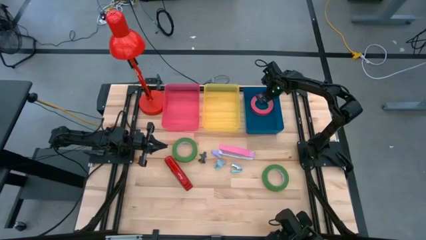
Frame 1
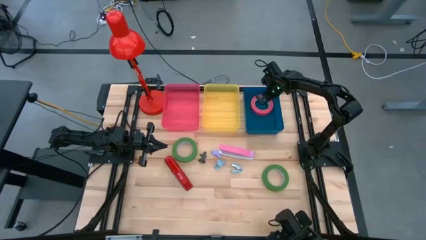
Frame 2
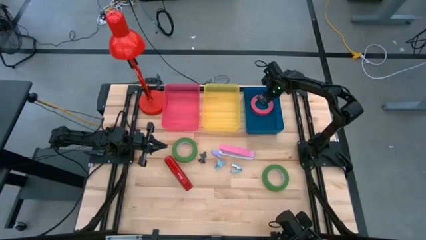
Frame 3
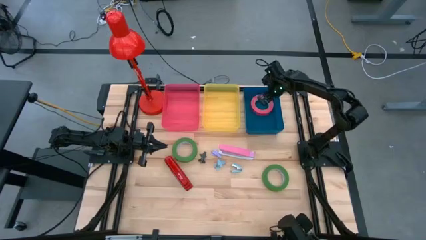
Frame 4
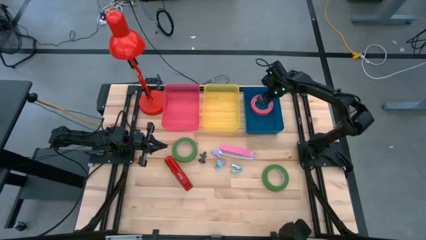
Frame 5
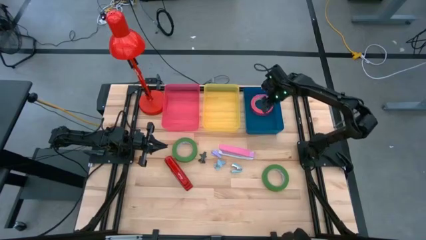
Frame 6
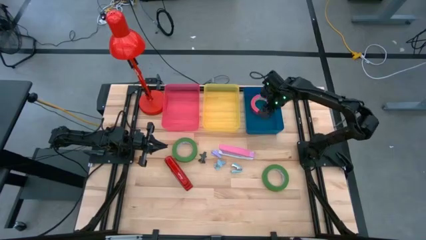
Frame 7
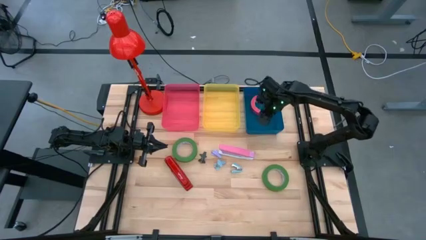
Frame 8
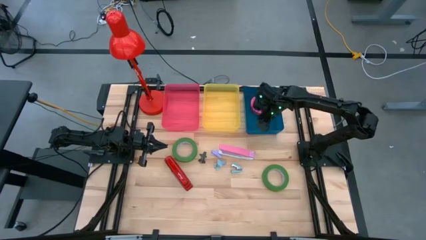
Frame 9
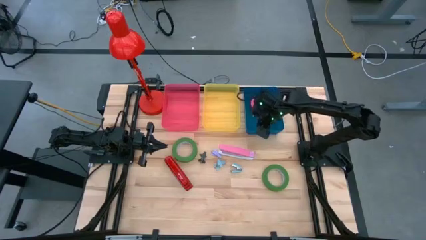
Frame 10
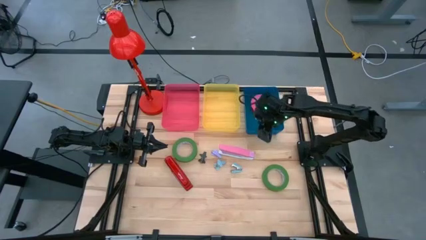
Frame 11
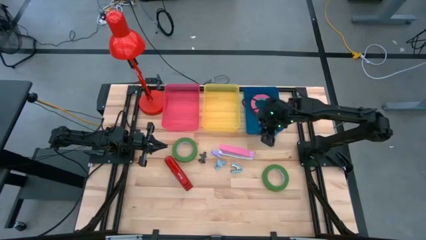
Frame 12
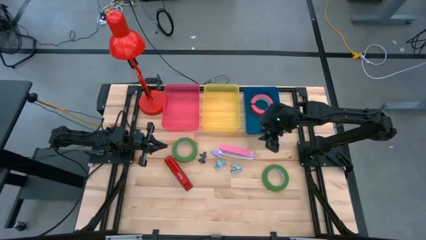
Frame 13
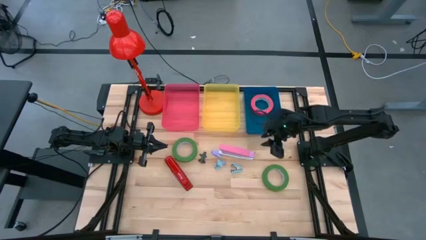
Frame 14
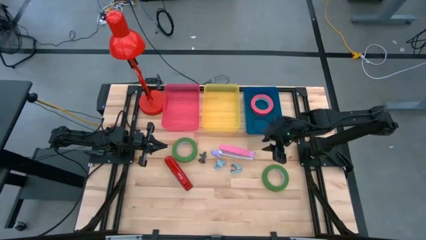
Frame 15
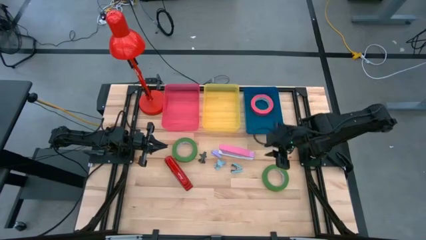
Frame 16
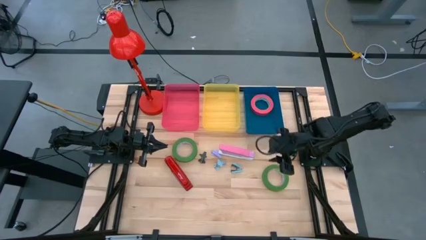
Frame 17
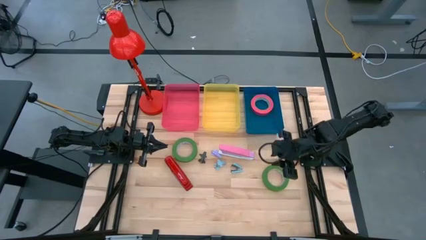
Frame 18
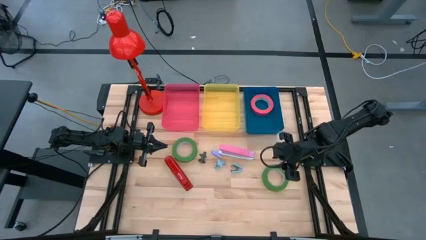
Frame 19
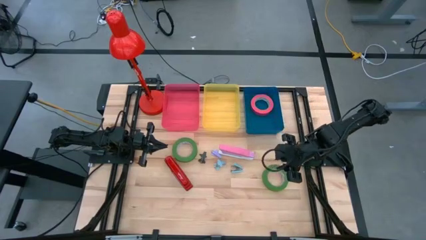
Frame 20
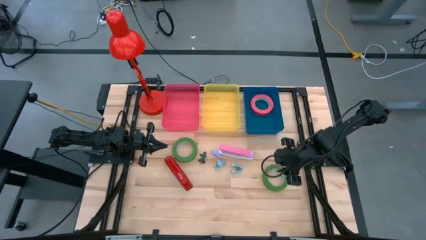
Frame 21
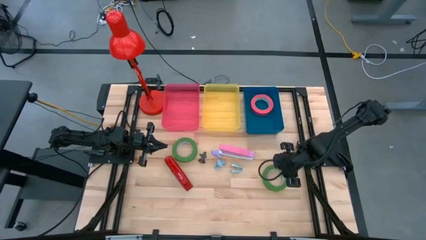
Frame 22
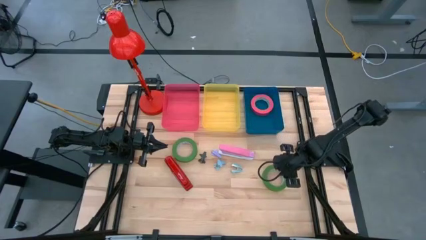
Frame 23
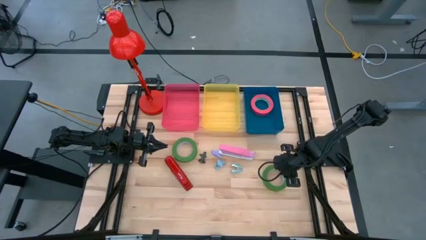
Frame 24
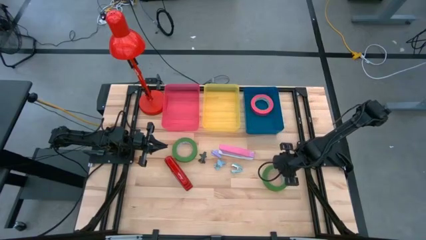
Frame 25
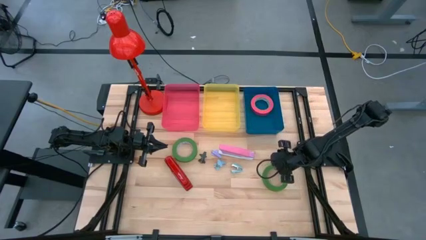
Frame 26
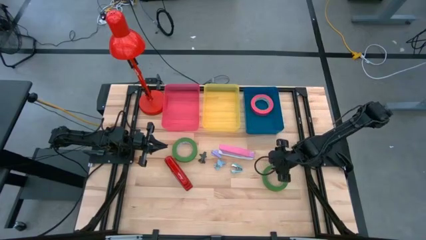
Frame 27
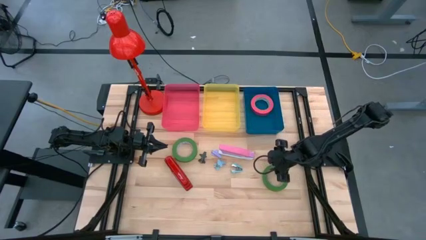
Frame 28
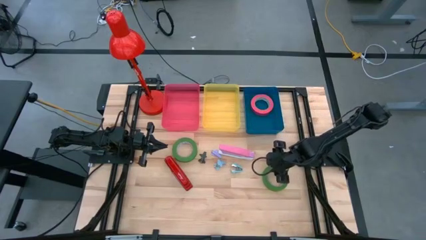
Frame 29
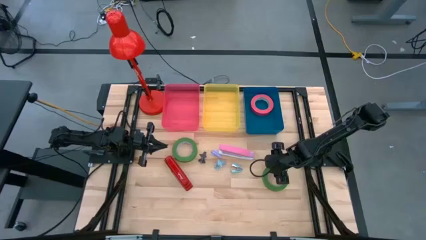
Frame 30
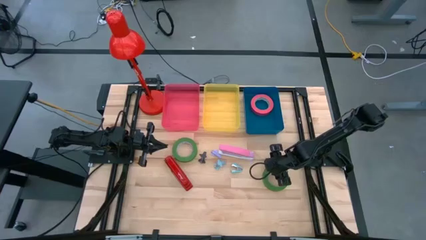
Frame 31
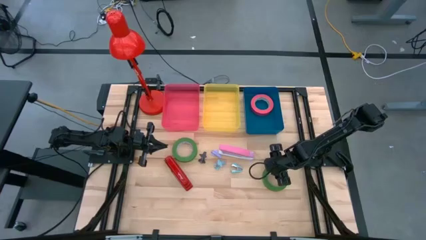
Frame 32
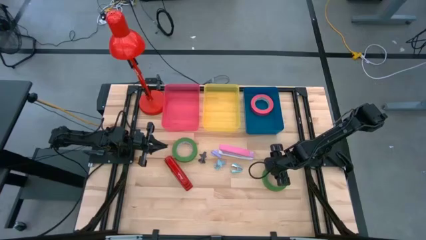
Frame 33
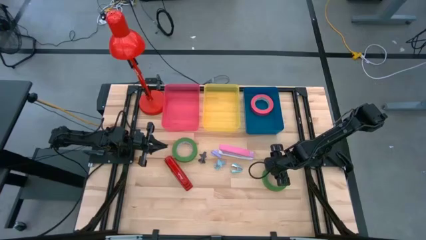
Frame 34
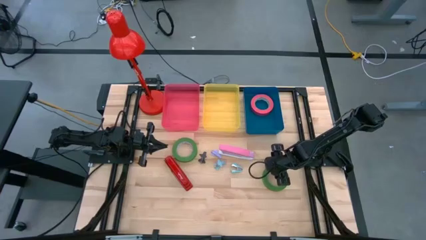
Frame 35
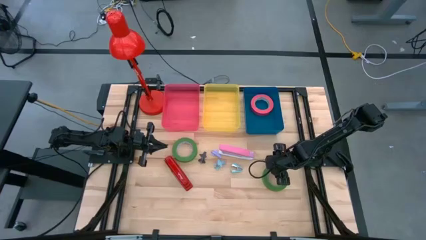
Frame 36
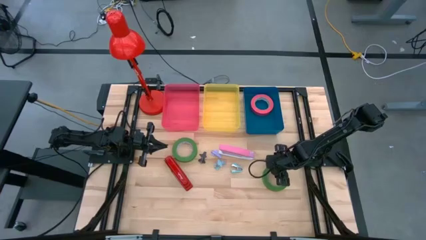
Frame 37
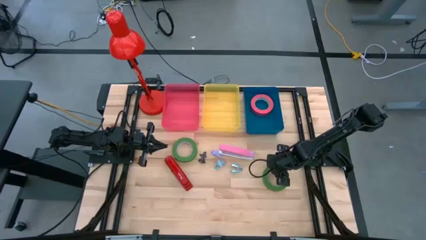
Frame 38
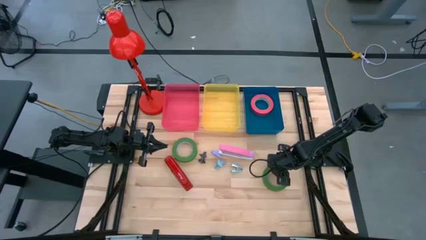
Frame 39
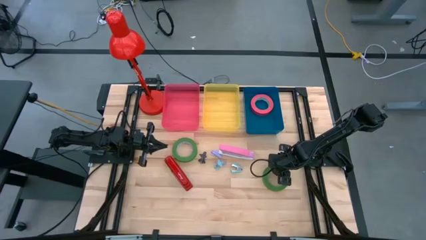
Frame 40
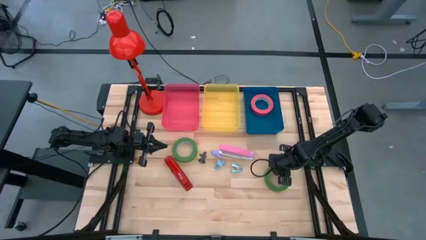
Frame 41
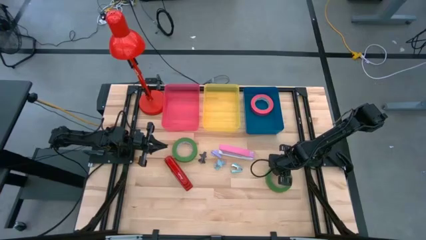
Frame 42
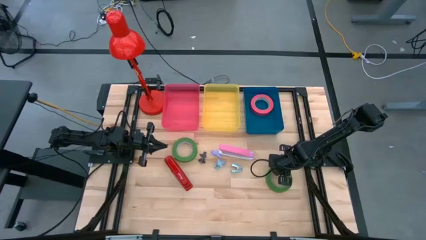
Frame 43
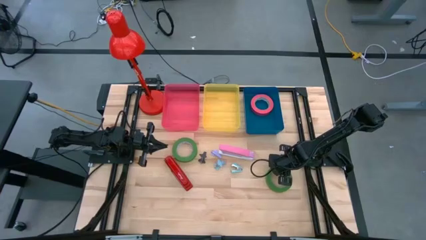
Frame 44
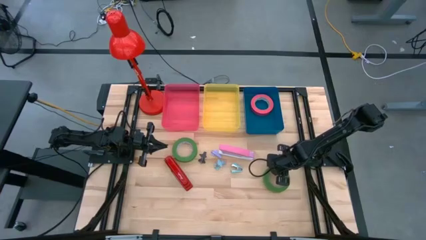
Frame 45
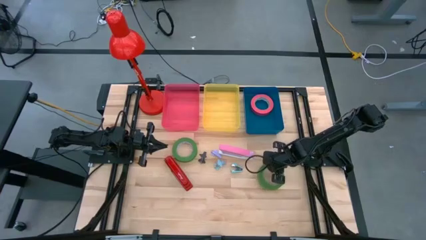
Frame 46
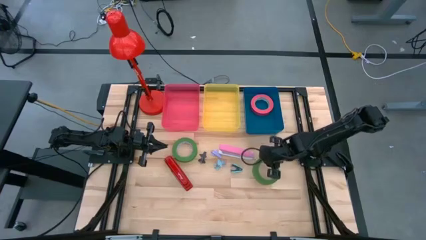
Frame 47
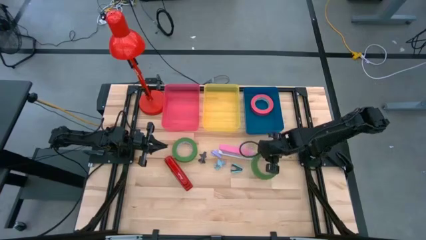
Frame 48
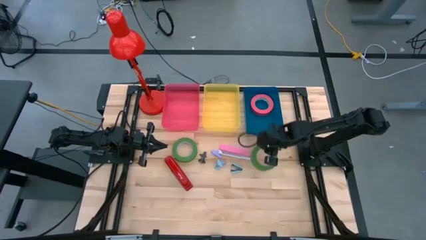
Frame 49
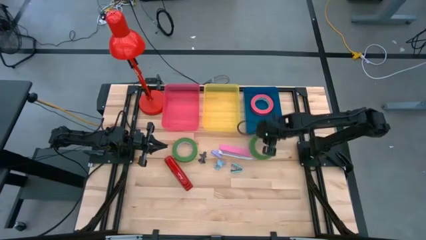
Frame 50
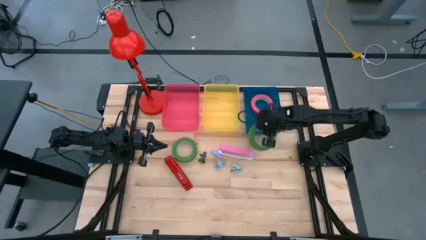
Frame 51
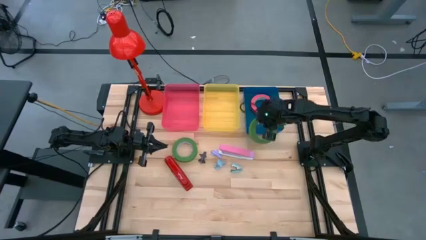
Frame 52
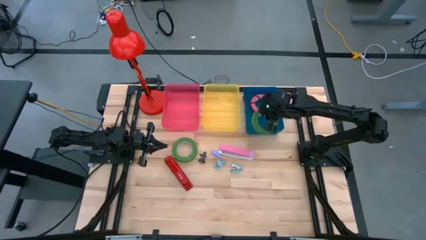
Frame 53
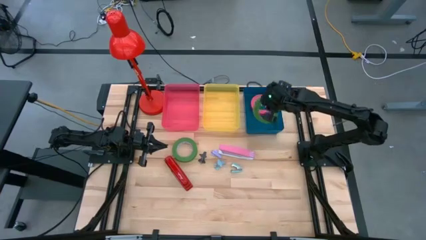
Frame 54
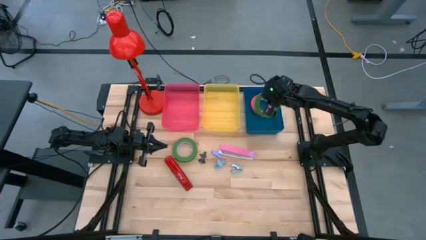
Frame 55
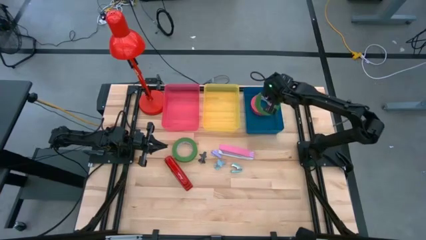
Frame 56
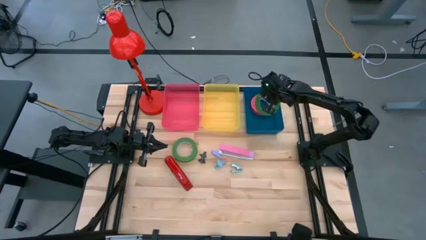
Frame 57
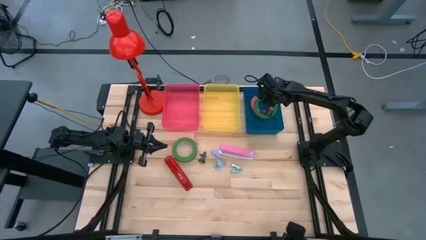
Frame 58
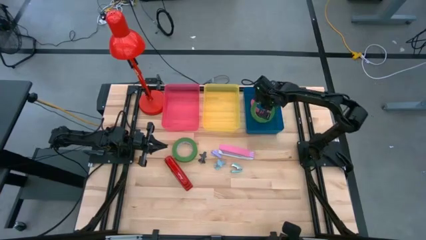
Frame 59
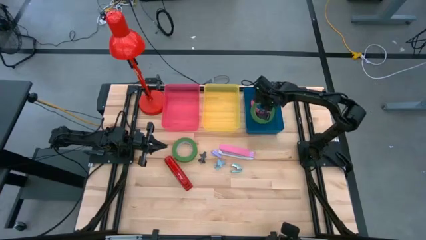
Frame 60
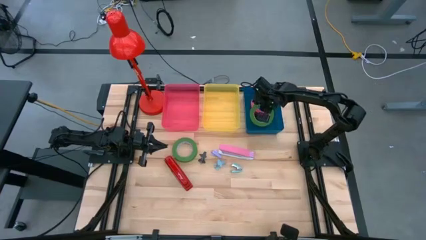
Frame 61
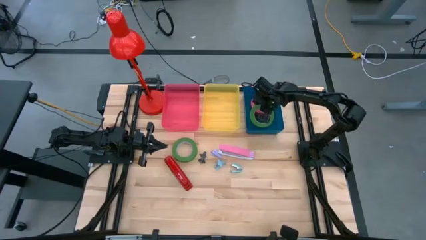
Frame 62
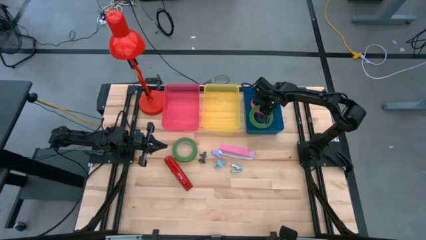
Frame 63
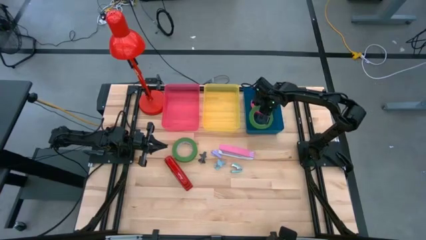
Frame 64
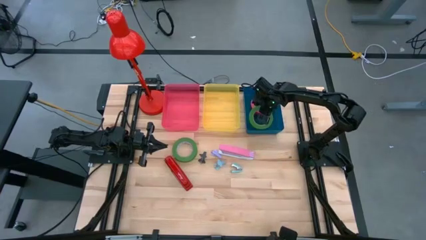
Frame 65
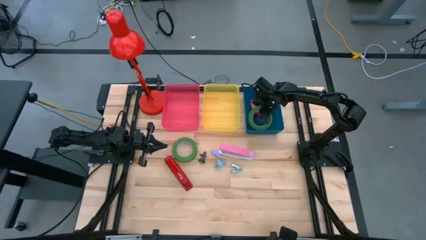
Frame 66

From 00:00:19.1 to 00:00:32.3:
Task: Pick and place Stapler, Stapler remover, tape
Put the right green tape into the blue bin
